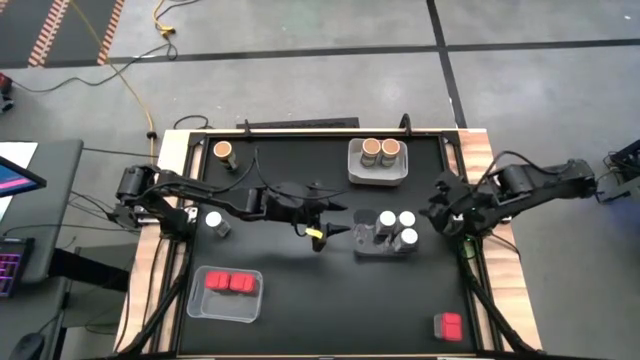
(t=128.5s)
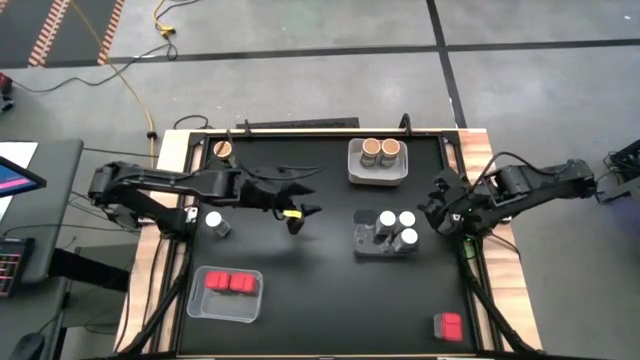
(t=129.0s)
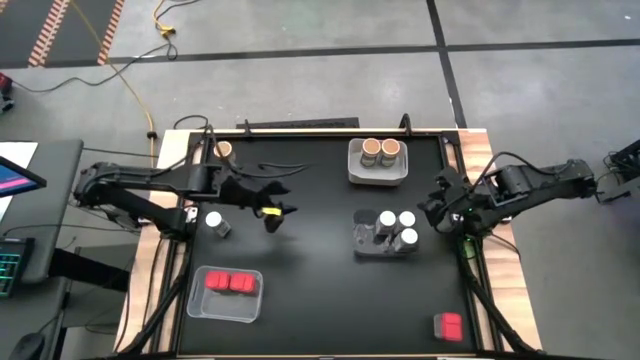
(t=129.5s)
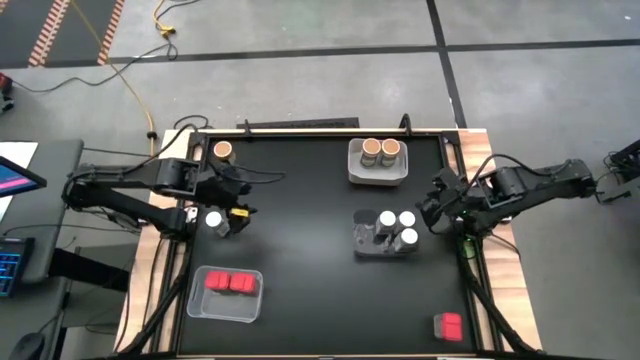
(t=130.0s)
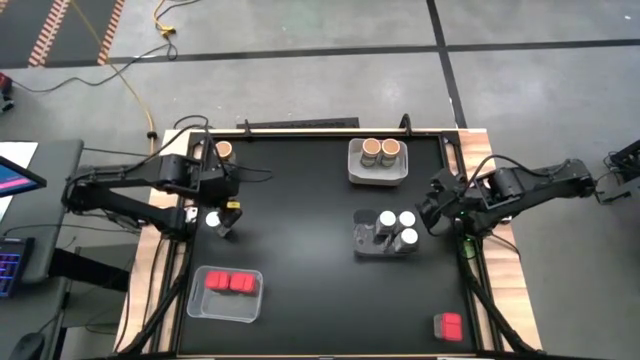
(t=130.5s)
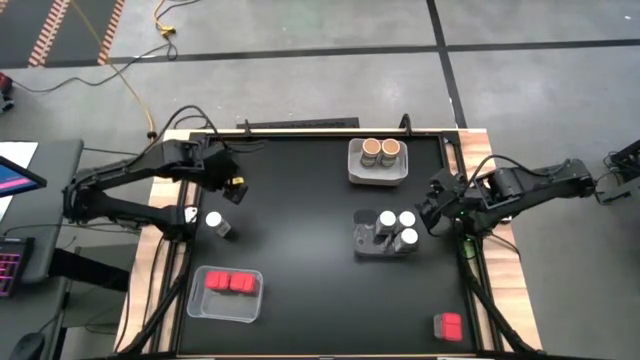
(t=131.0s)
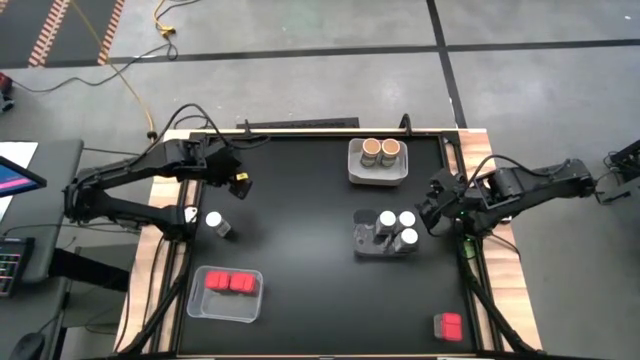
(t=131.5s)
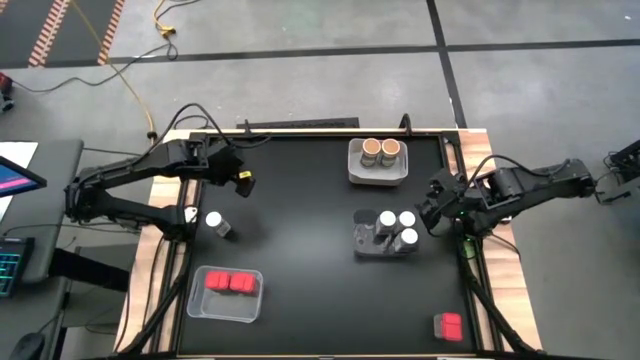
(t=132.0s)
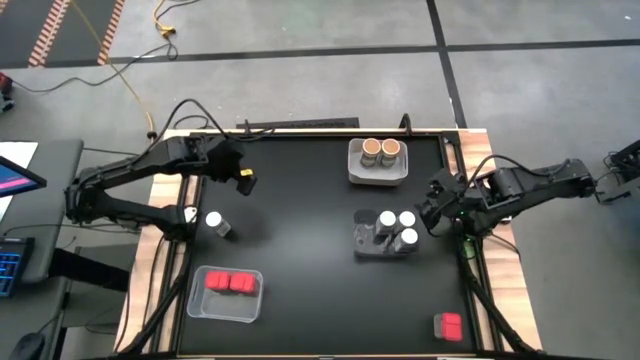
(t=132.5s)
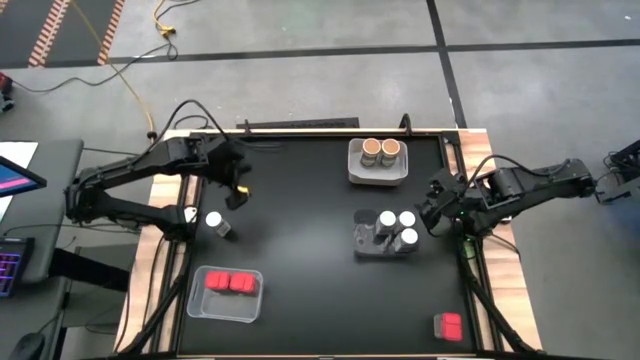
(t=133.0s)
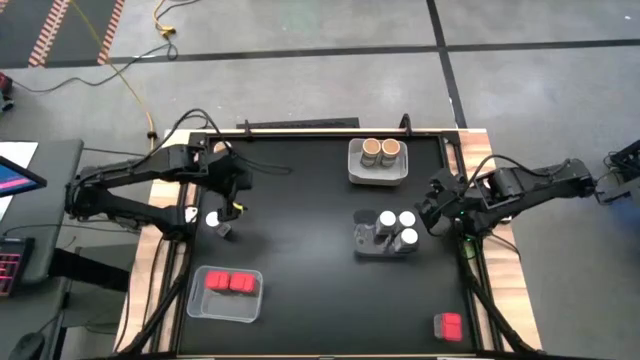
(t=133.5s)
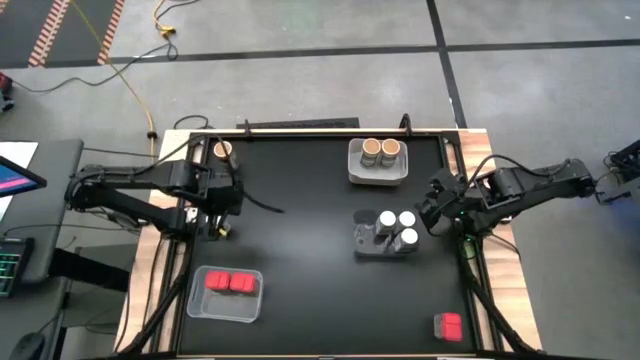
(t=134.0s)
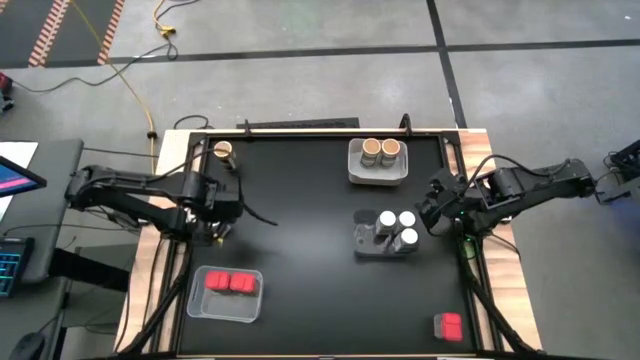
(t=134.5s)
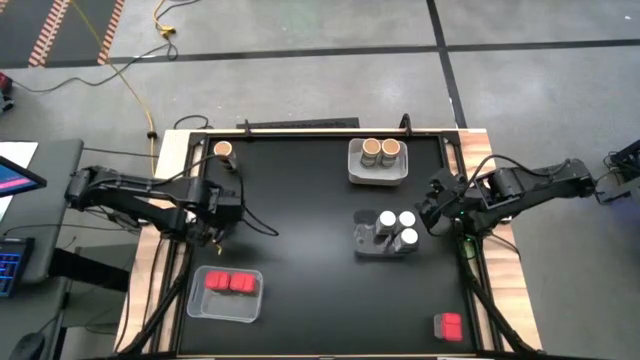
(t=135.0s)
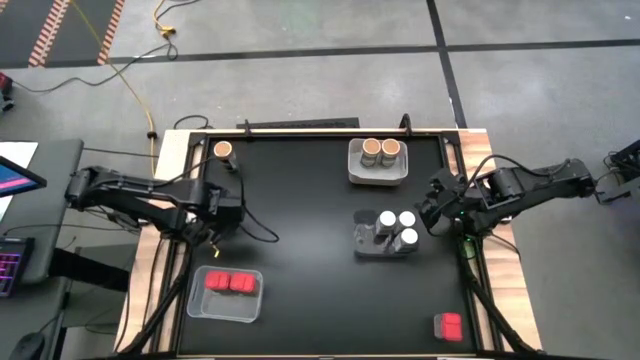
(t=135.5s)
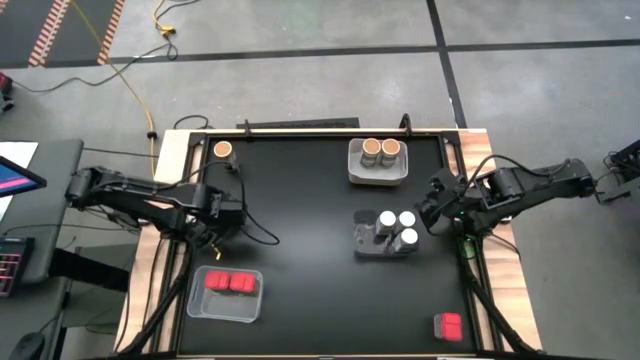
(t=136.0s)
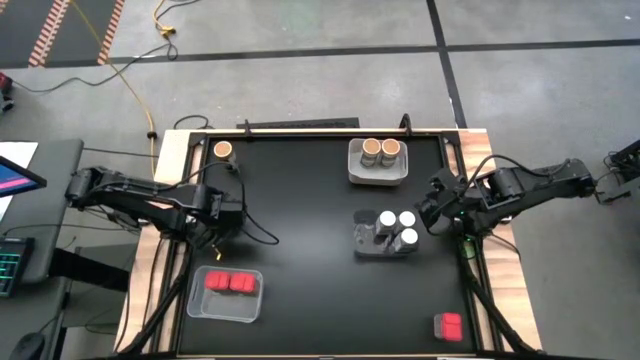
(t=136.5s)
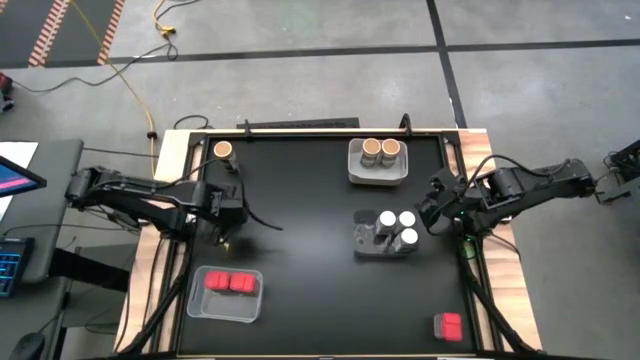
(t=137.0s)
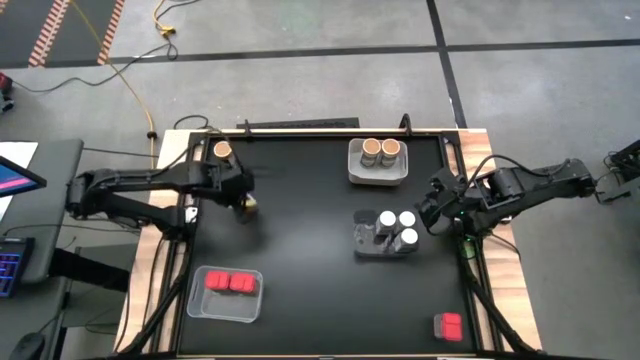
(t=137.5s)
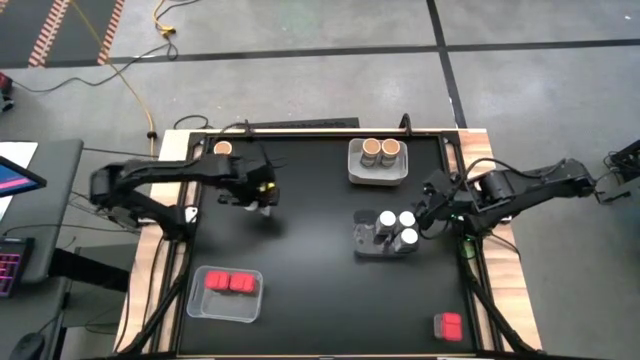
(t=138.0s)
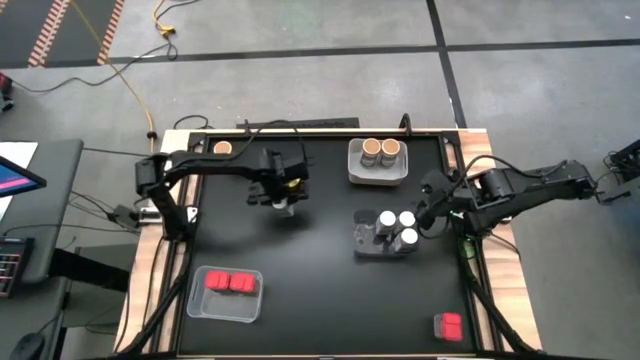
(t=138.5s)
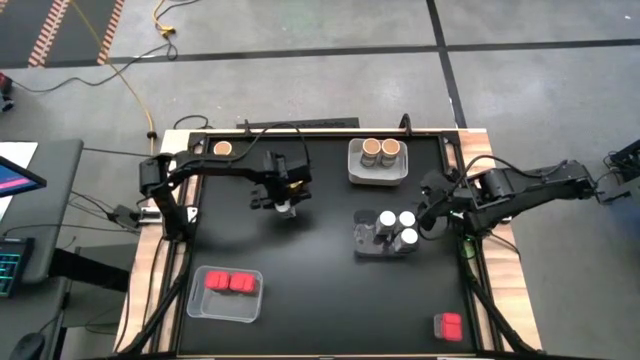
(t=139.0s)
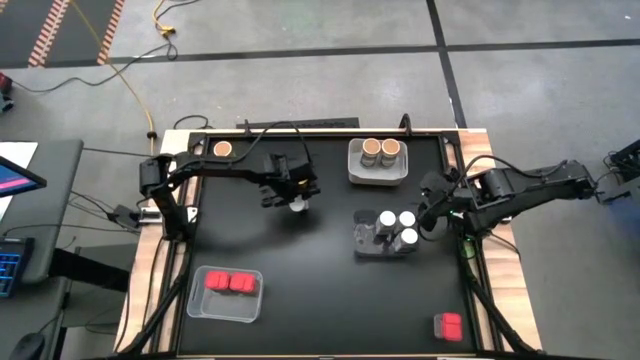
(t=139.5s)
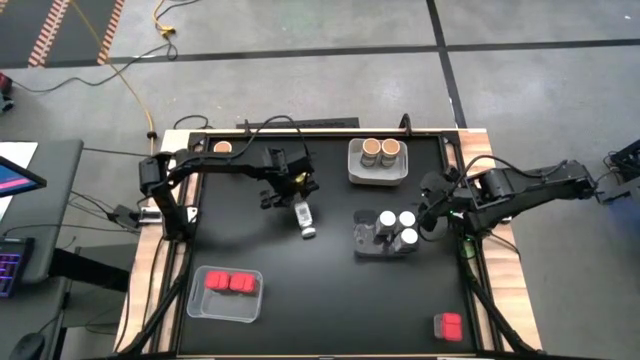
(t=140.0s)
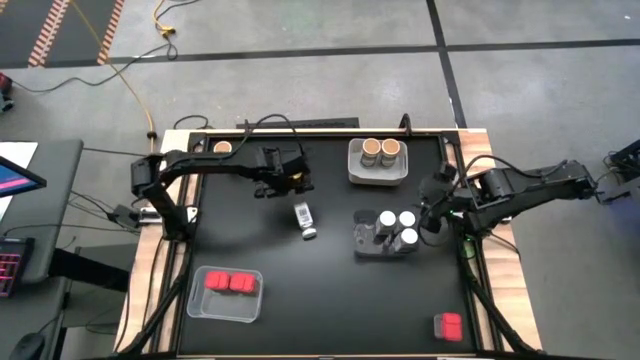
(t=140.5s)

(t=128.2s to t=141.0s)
Task: Sort spices by type
Put the white spice bottle in the black bin

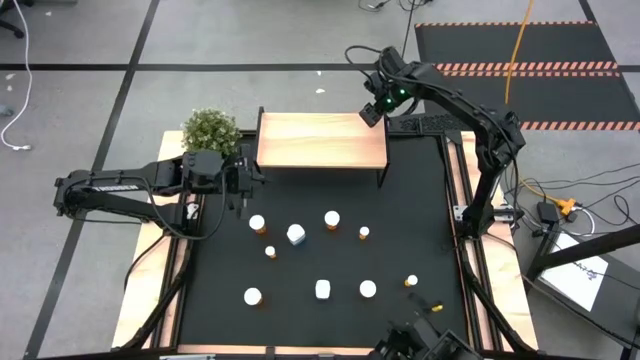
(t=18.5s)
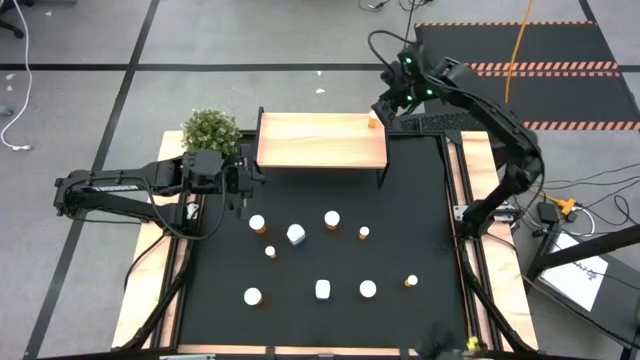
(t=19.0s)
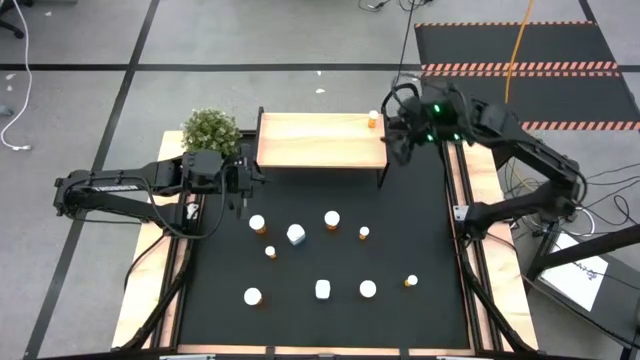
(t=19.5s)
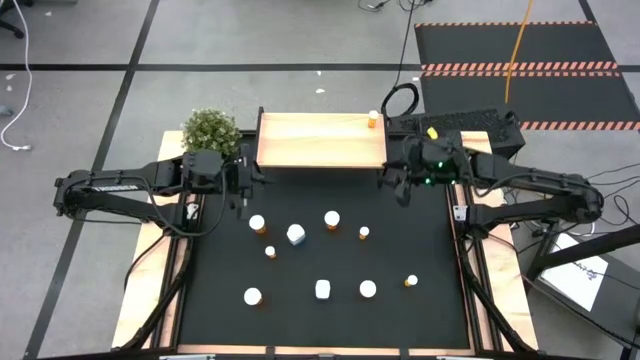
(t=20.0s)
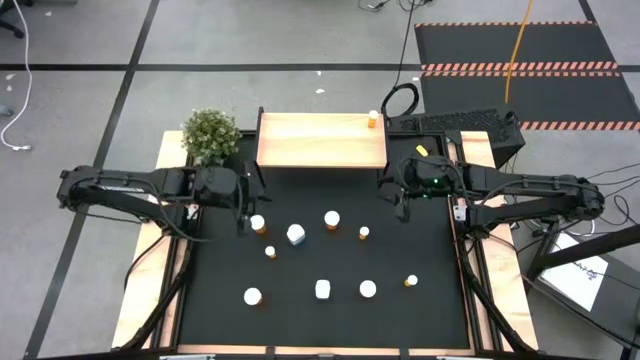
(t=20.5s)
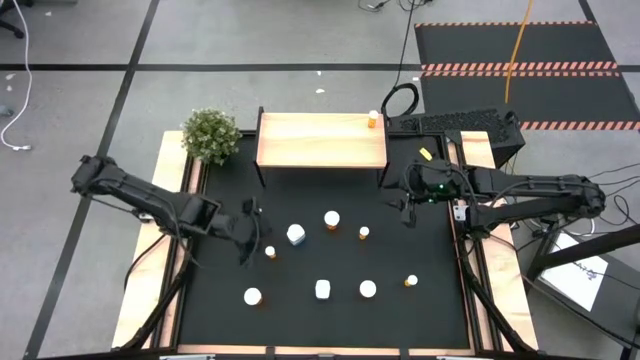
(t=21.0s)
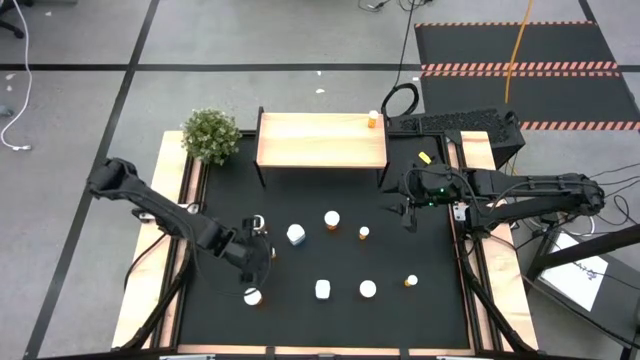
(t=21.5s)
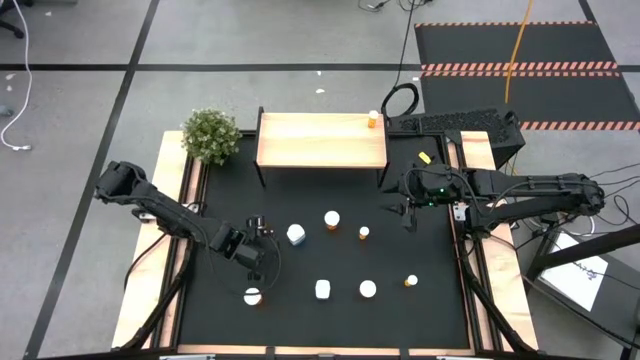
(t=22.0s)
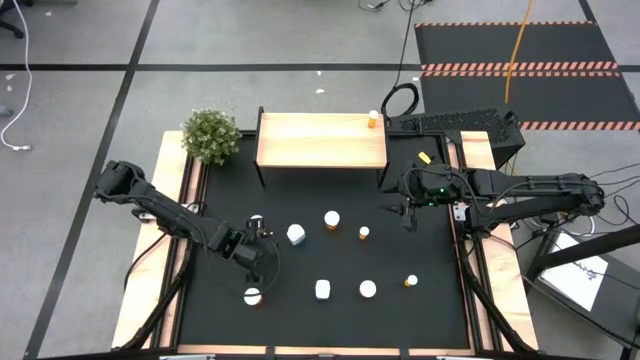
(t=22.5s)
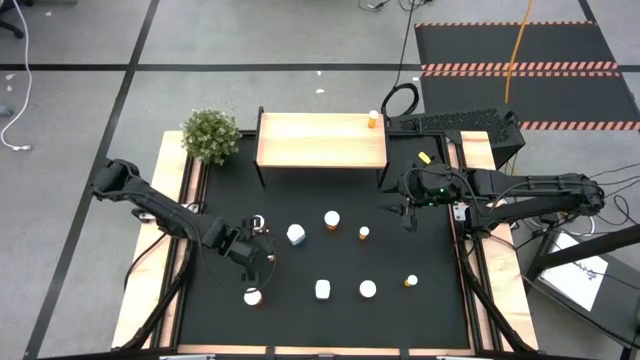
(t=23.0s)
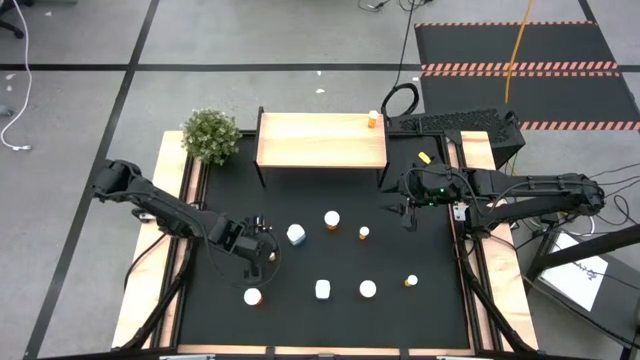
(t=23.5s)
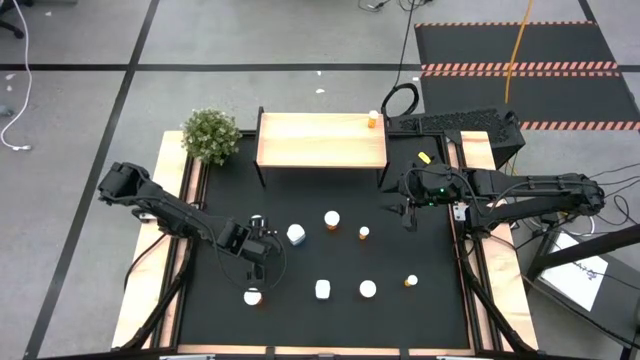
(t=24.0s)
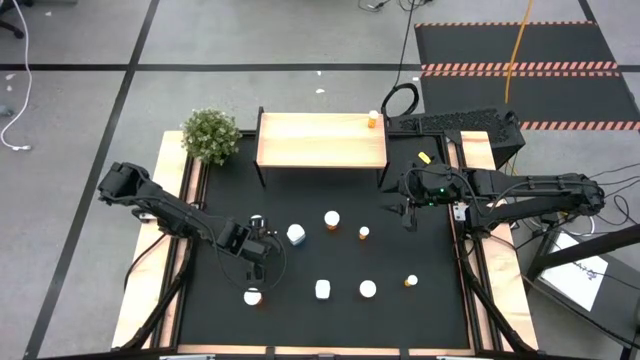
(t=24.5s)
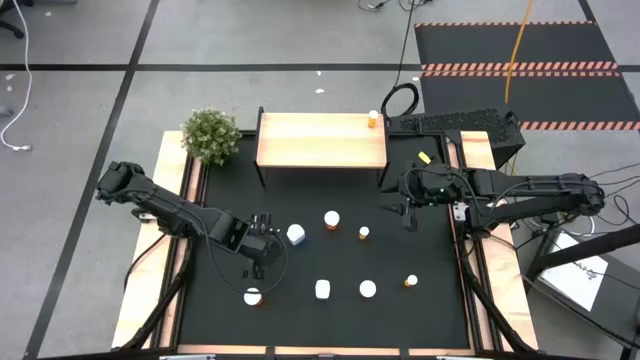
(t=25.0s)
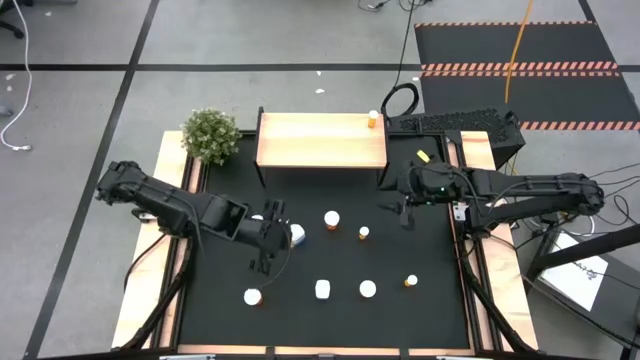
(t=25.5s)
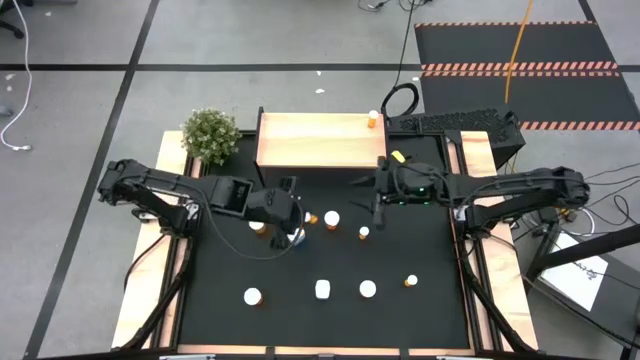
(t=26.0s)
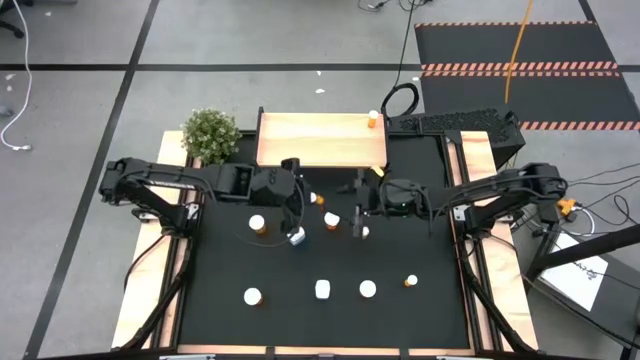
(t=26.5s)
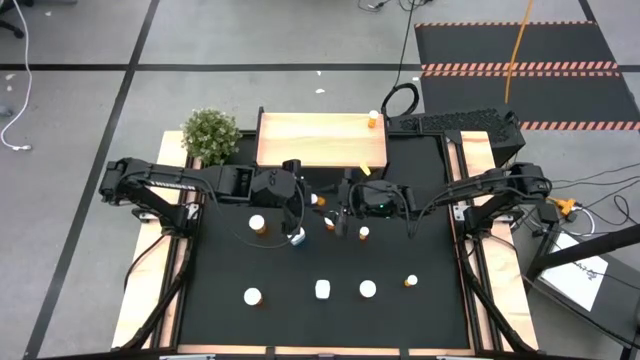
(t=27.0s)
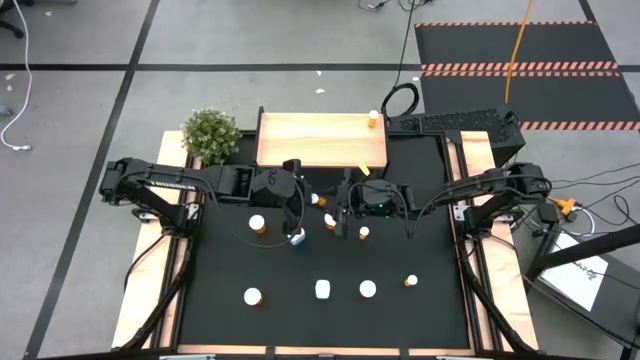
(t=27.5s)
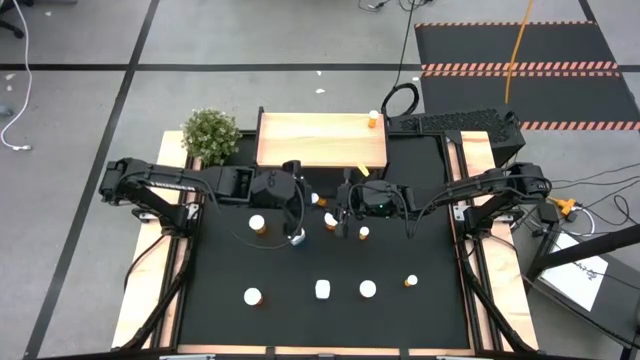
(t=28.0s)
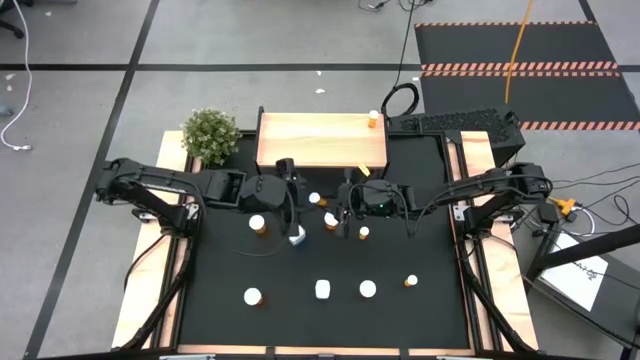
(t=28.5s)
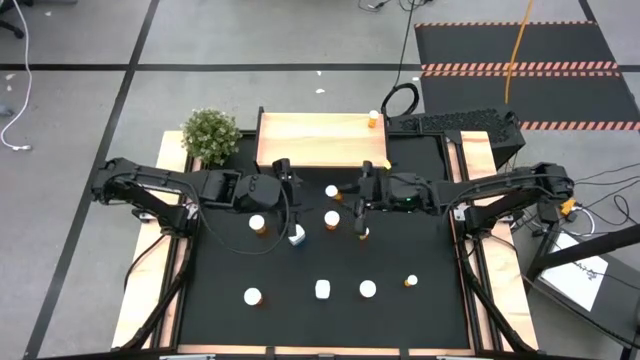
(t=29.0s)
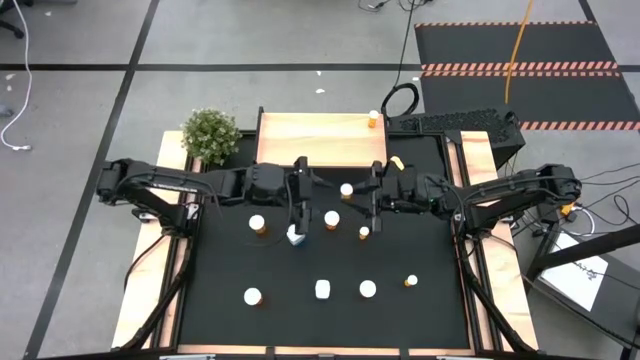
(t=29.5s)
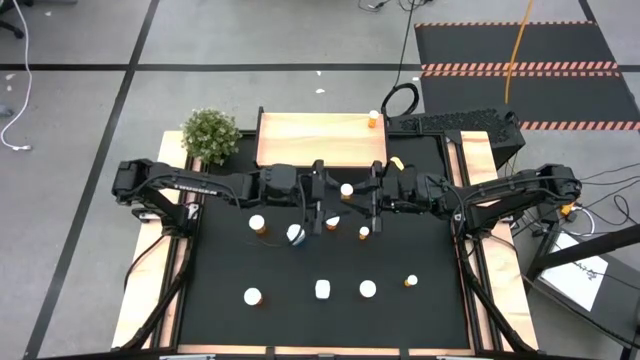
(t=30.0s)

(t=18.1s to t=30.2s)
Task: Pick and place medicine bottles onto shelf by color
Put the small orange pill bottle on the shelf aligned with the other small orange pill bottle
